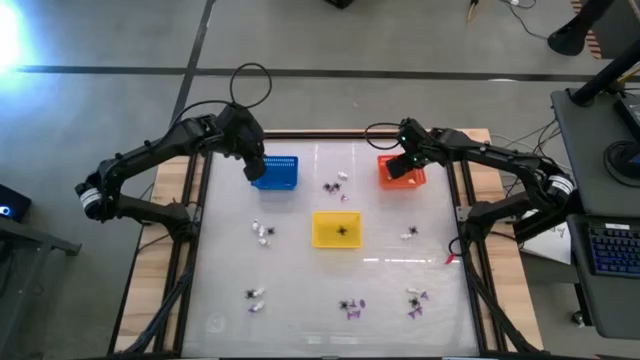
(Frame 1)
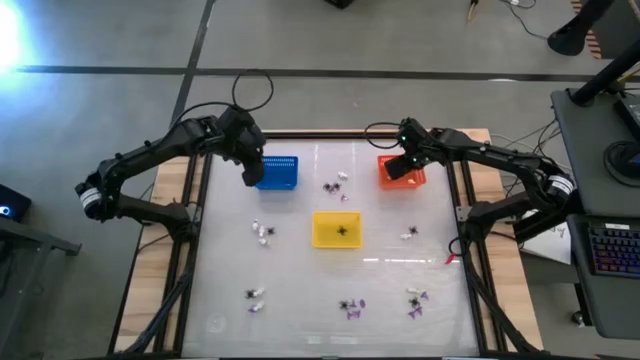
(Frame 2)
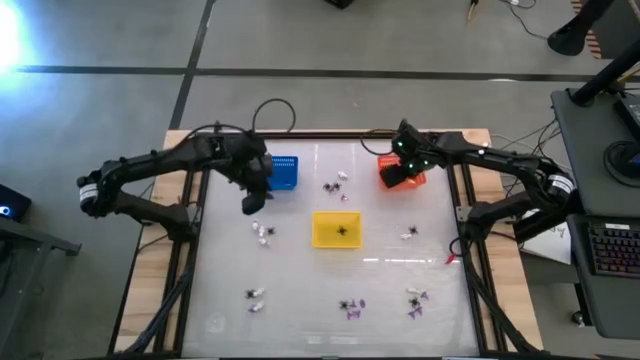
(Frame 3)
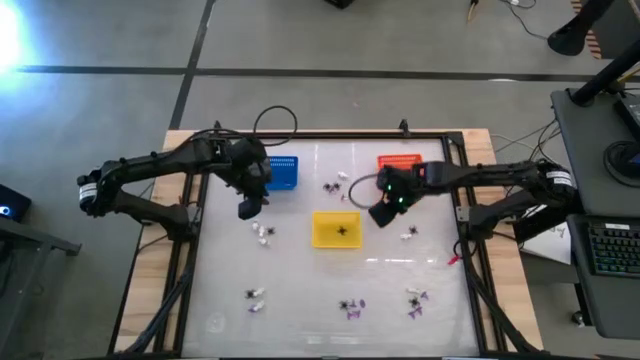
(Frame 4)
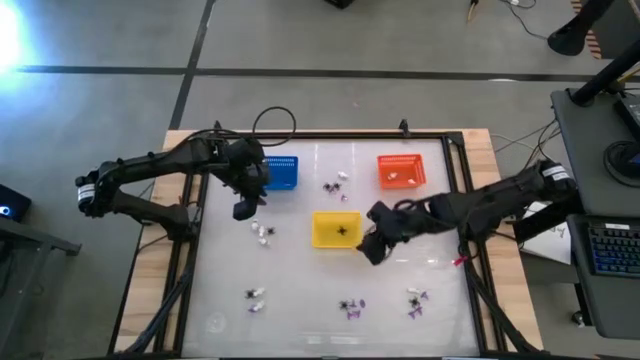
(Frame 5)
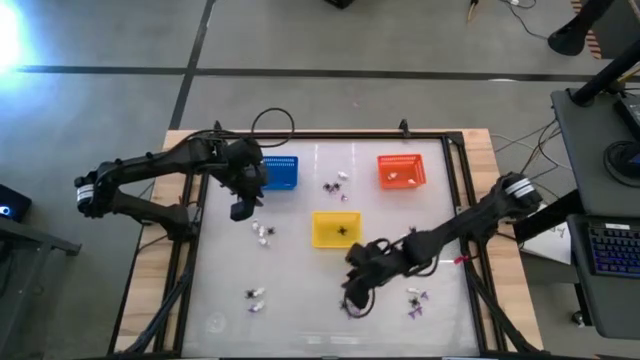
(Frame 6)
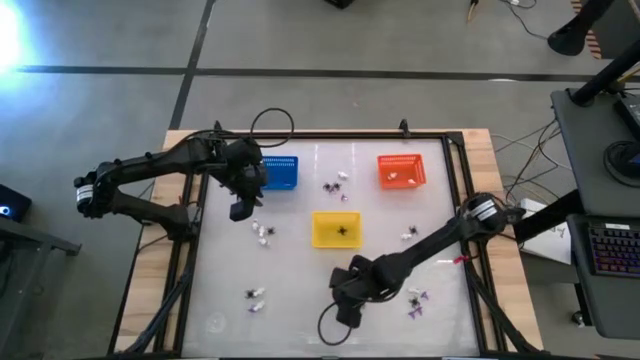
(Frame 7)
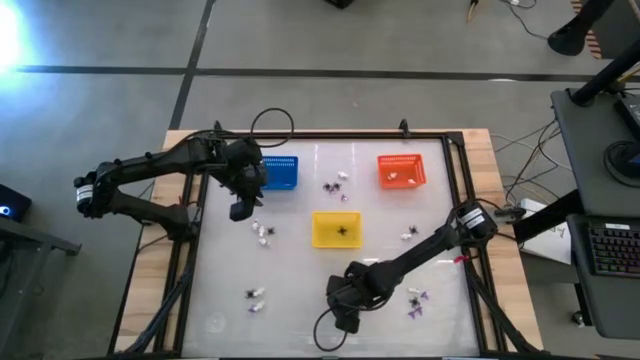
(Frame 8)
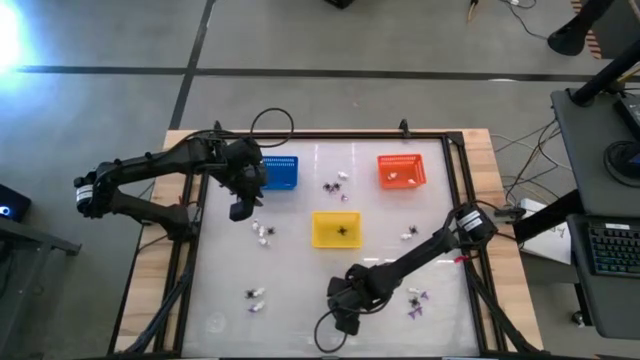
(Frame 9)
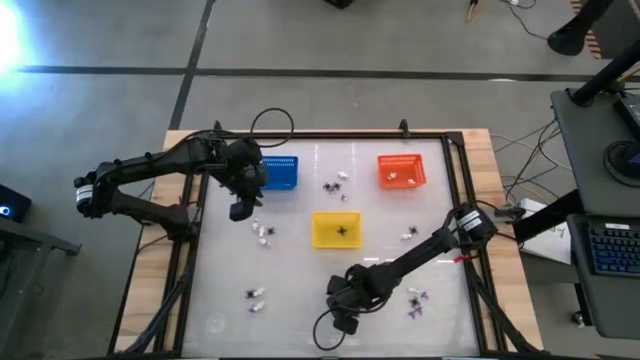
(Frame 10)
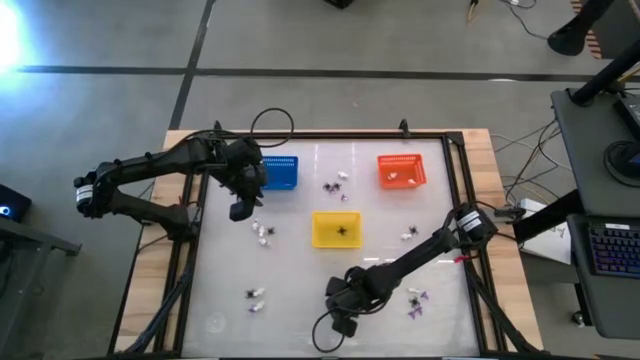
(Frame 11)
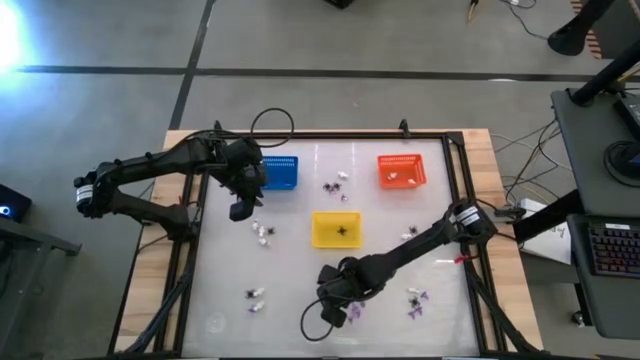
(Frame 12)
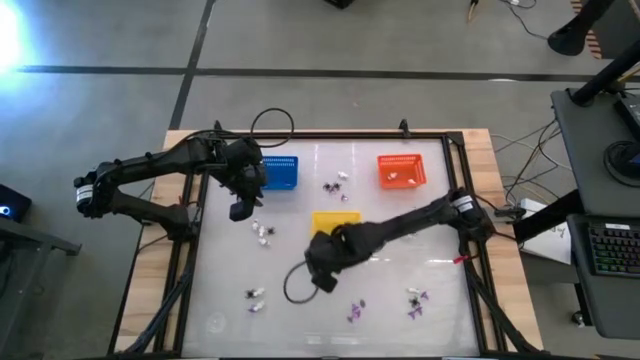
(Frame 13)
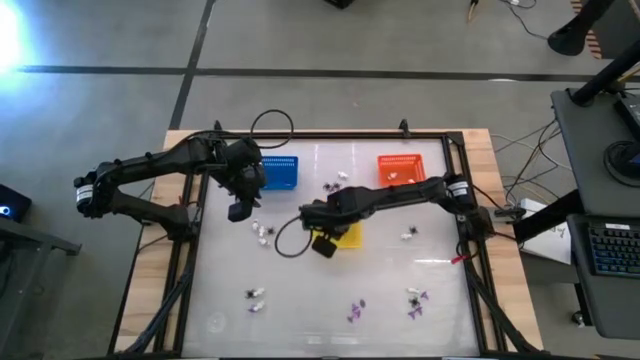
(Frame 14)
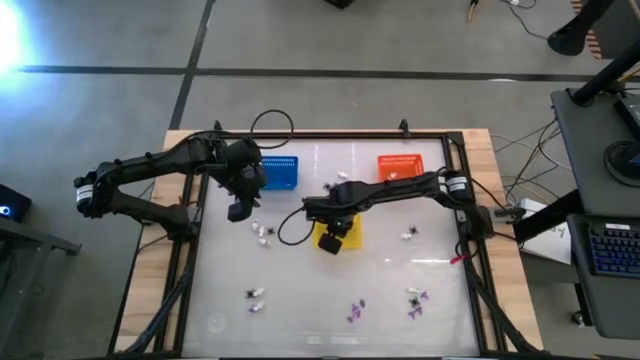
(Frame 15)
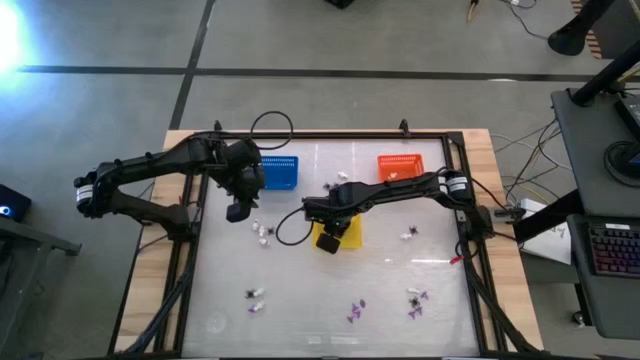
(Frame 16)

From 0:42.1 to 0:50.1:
Task: Sort Halloween decoration
Put the black spider toy into the yellow bin

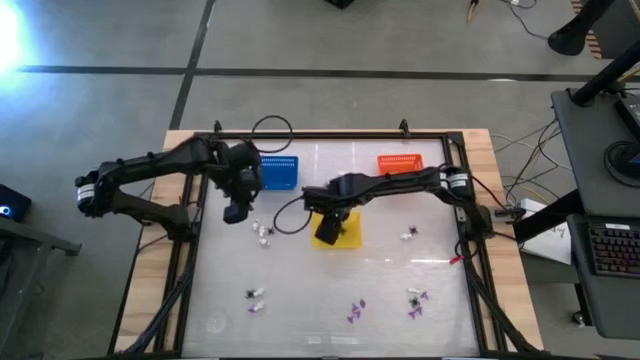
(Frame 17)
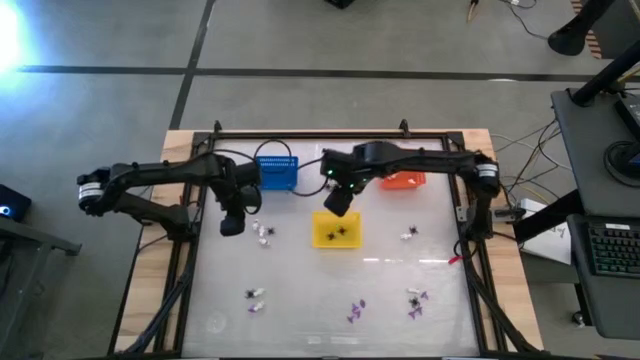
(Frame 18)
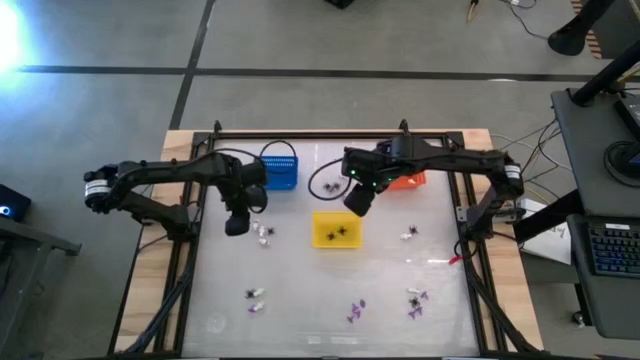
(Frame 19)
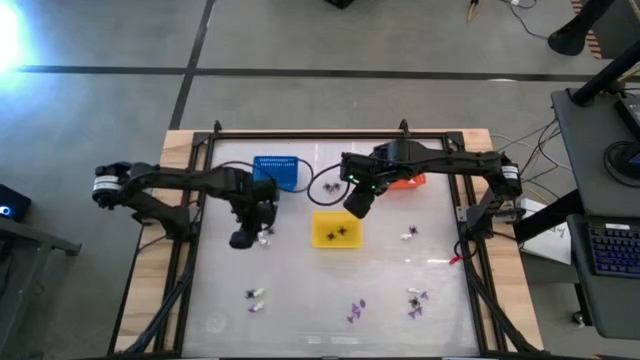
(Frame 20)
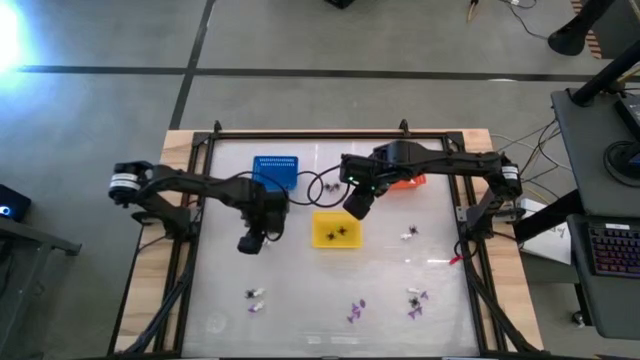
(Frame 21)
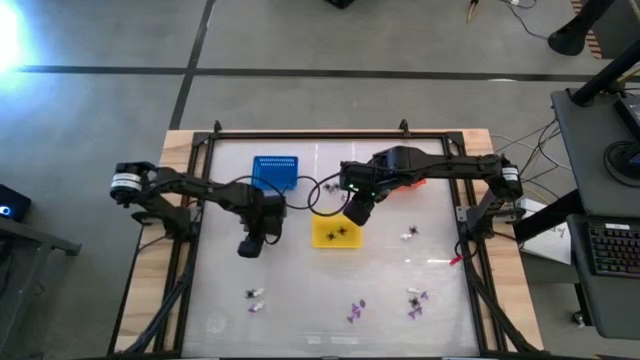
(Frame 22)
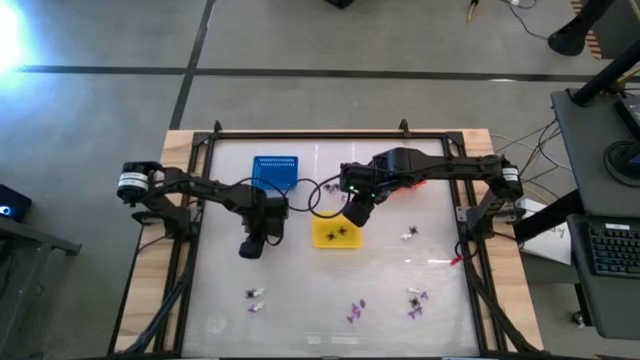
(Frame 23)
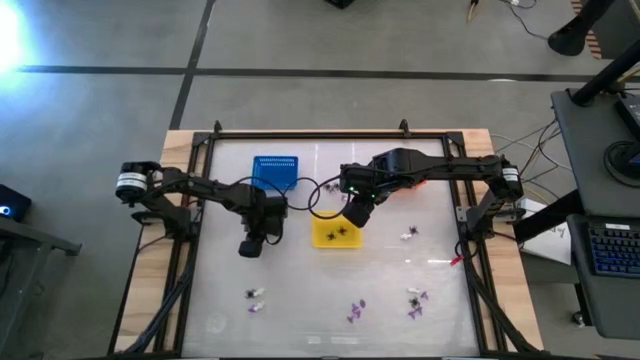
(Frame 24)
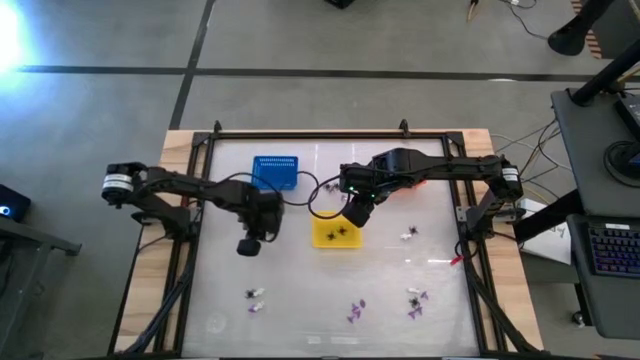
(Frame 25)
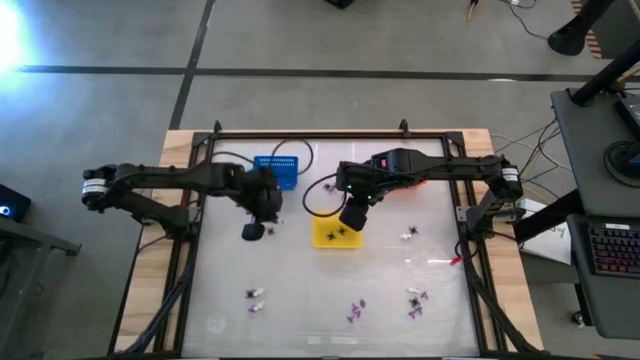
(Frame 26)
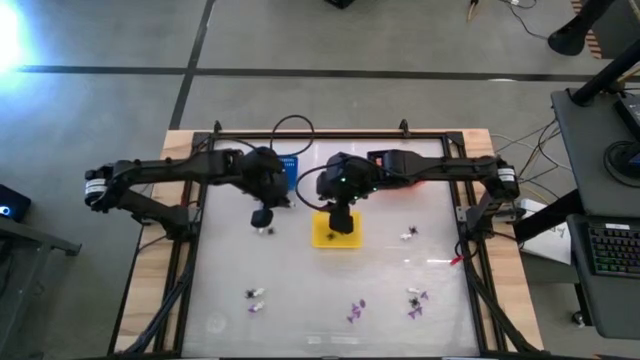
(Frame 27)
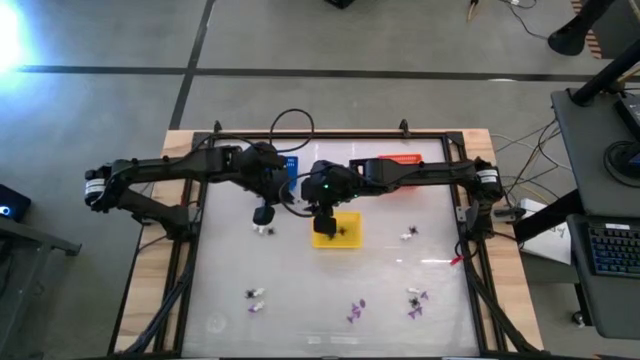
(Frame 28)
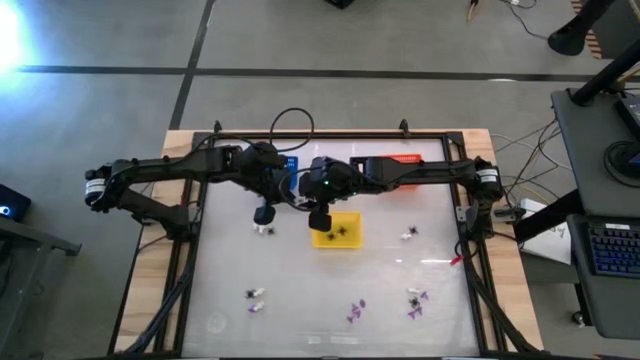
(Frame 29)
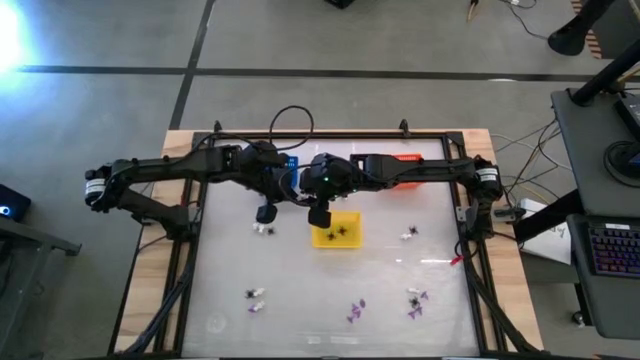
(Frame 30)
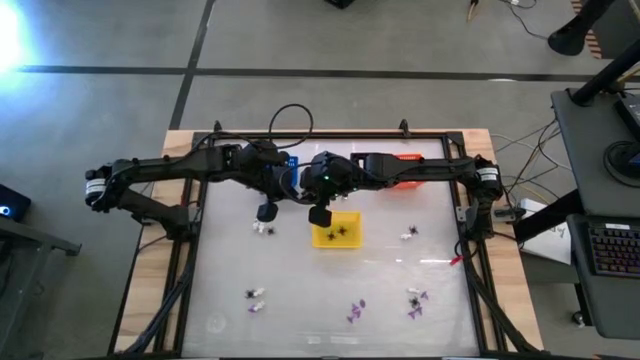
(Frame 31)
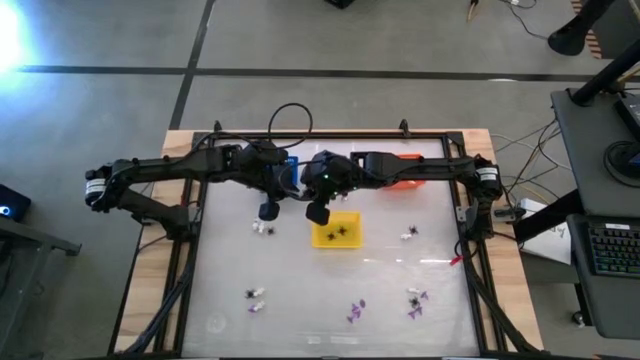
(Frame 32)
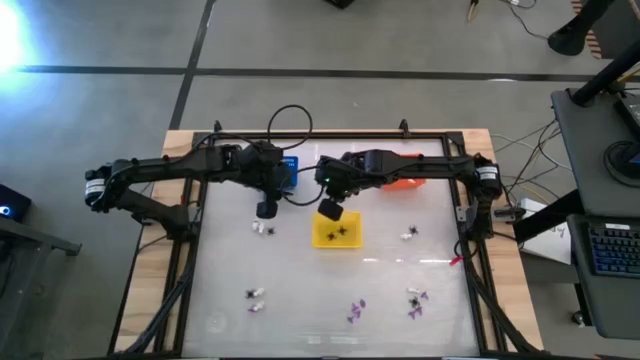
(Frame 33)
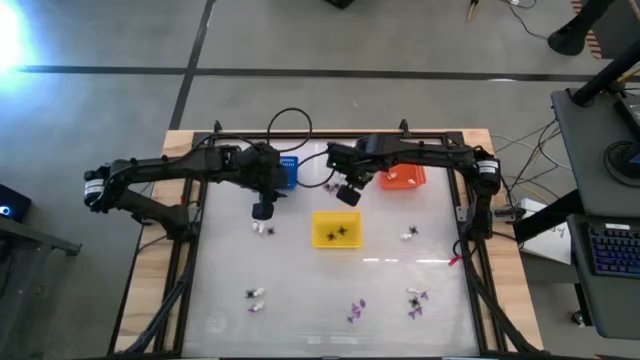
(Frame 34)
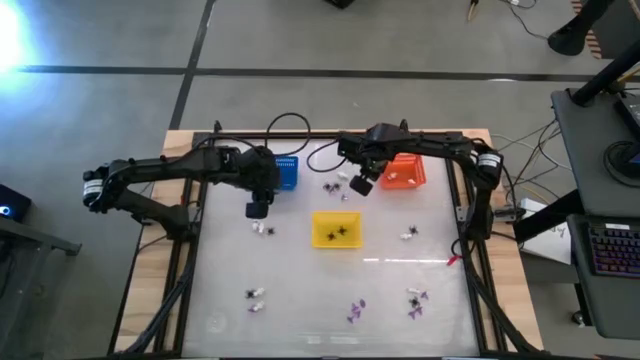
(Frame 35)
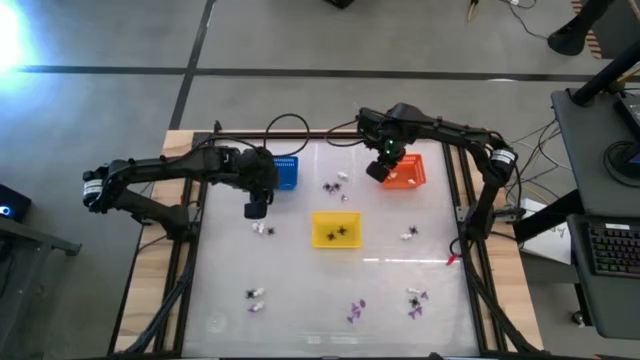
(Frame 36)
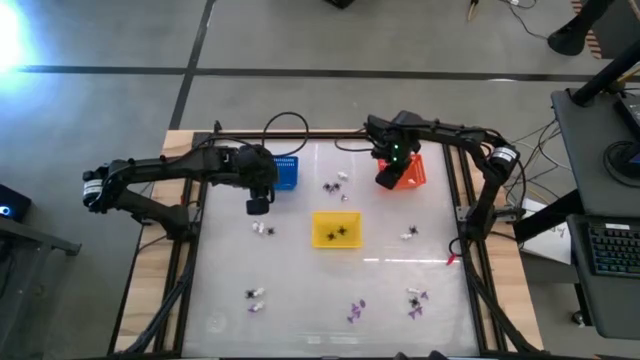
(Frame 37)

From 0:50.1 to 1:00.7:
Put the white skeleton toy into the orange bin

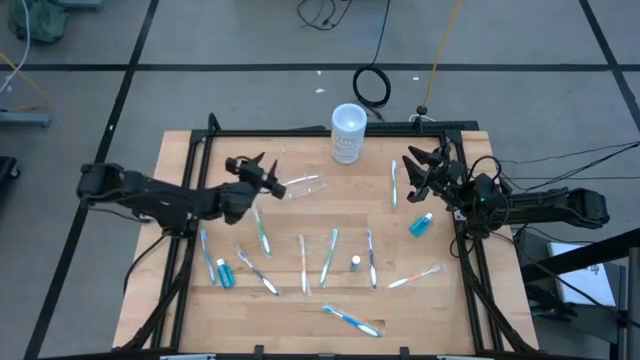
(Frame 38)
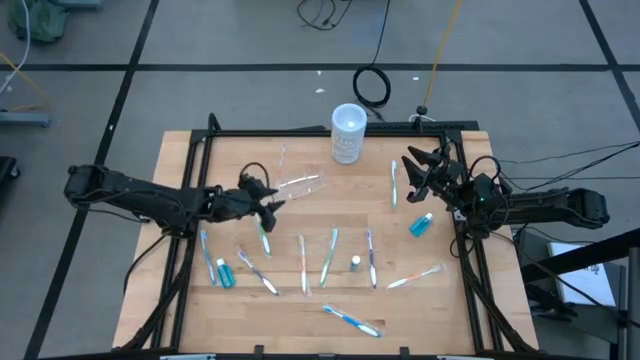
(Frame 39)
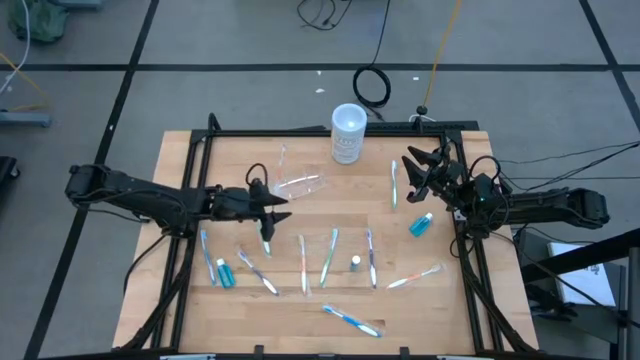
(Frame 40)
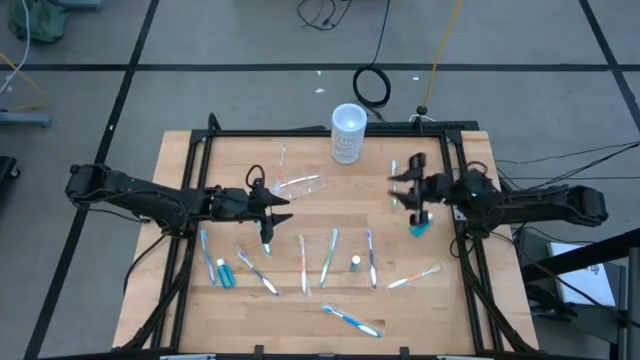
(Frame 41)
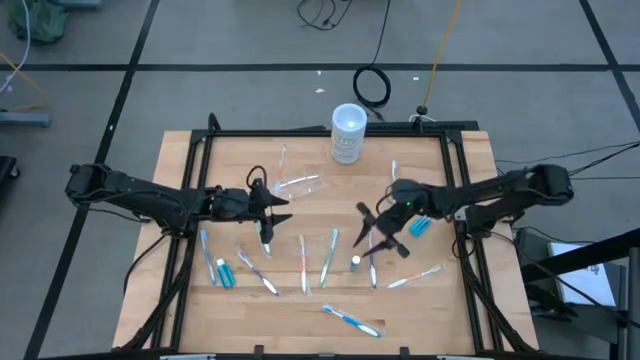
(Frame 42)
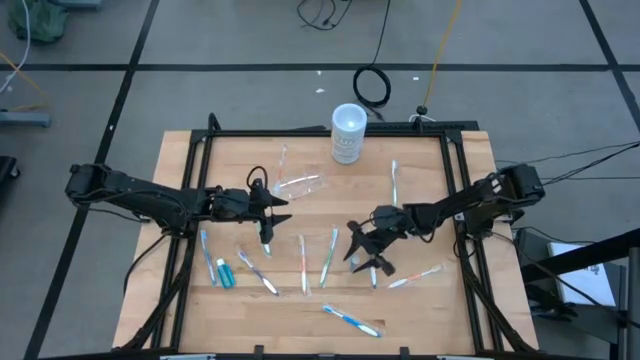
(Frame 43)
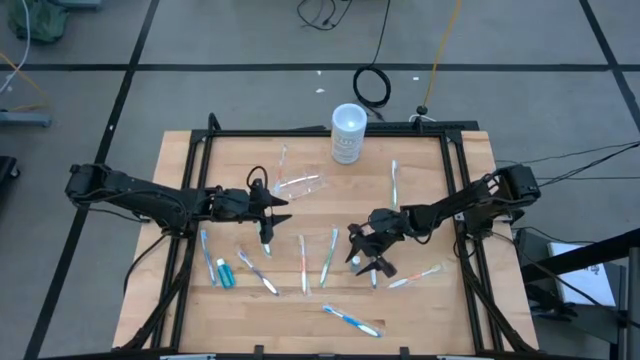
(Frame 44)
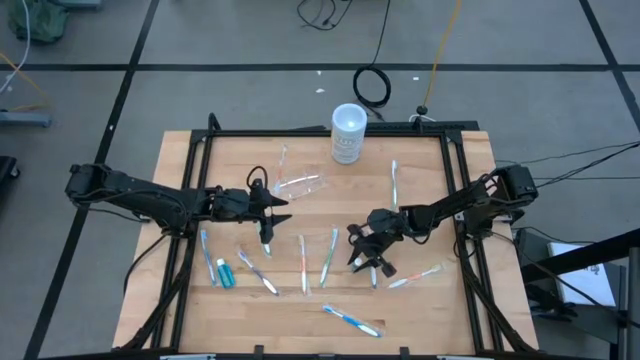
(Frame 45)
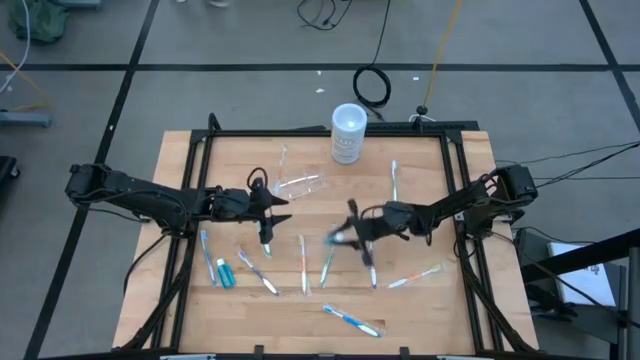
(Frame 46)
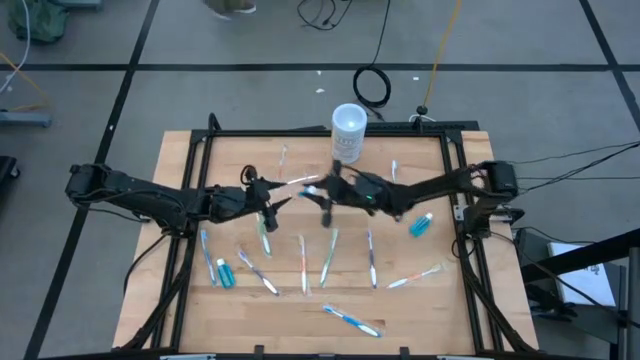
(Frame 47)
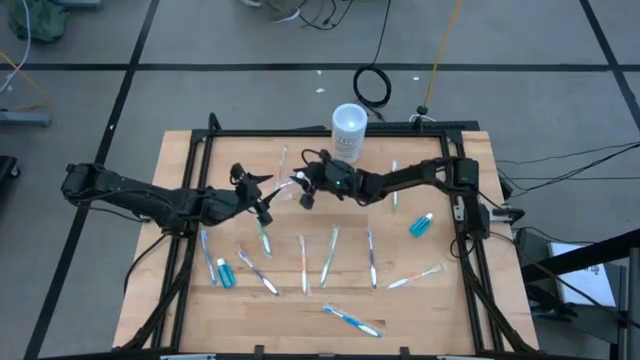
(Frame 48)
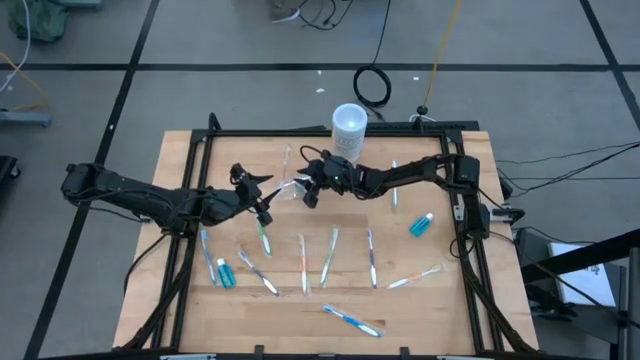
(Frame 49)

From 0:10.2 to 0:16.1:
Task: Pick & Place toothbrushing station
Put the middle blue mouthwash bottle into the transparent organizer
